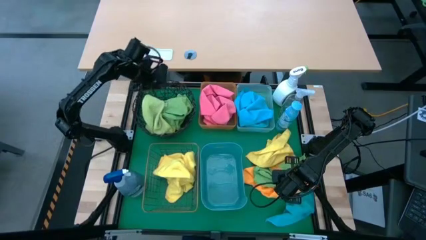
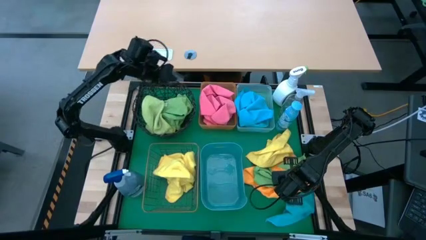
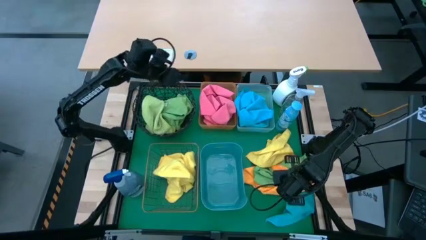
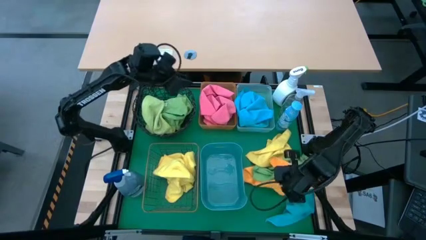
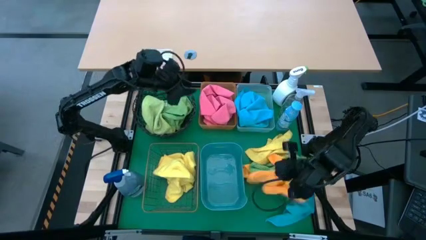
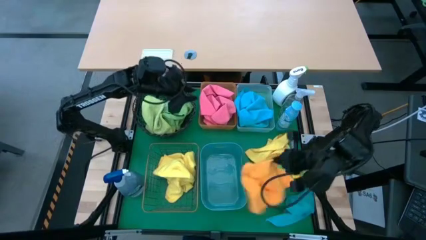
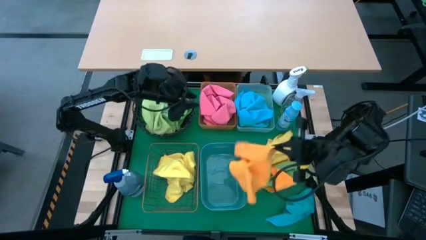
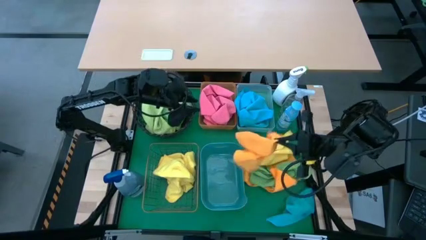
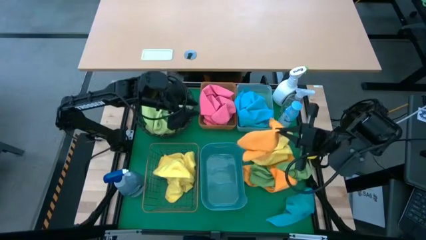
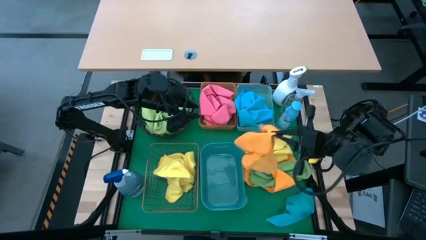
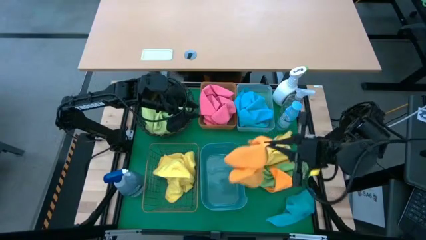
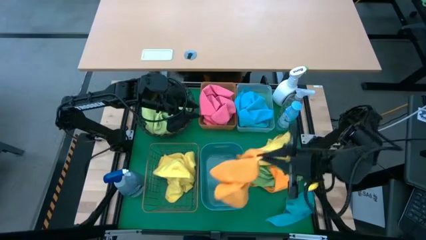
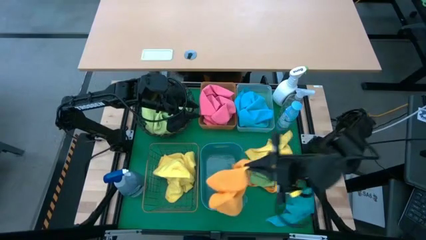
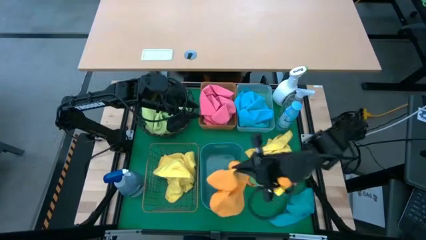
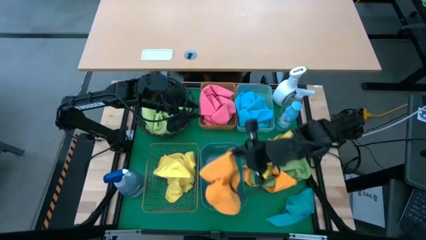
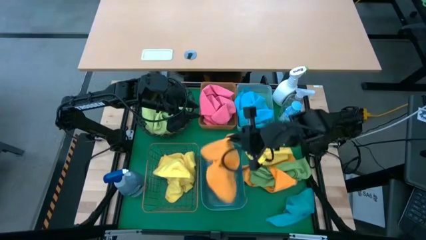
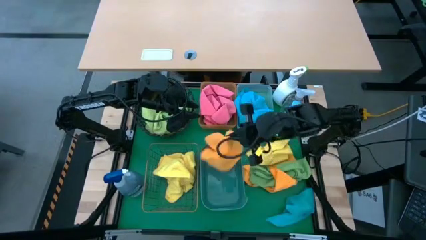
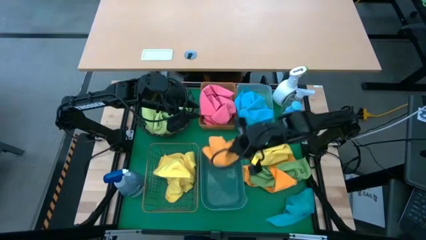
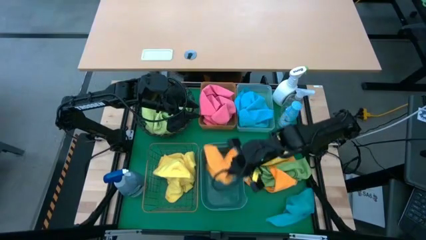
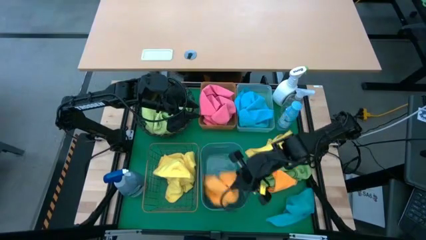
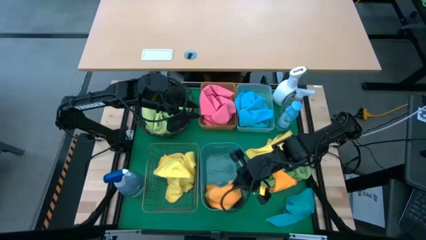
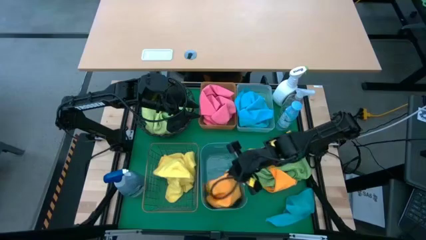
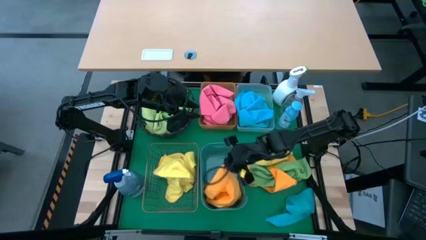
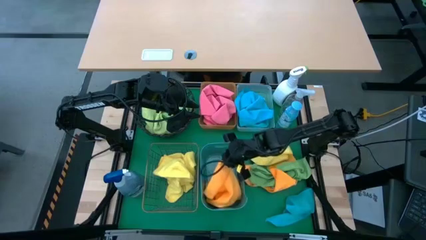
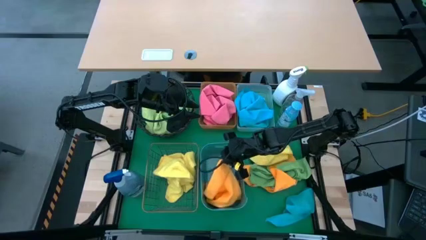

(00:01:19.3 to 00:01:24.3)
Task: Sort microfiber towel by color & place in baskets
Put the orange towel into the blue bin

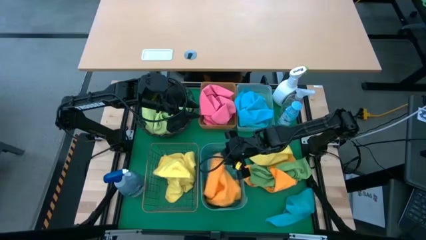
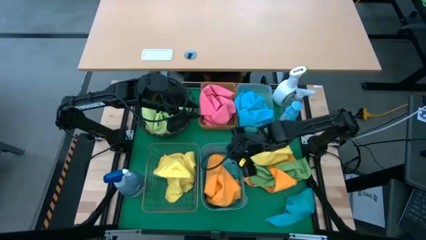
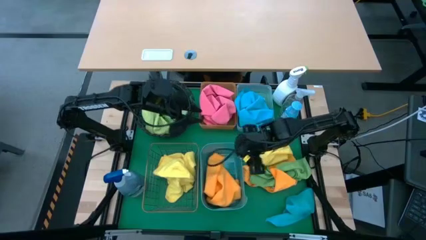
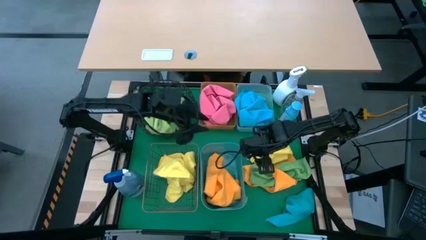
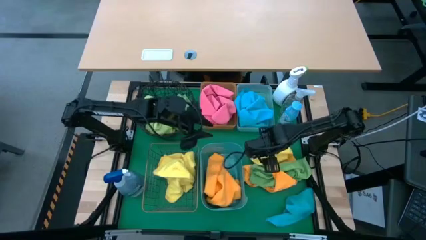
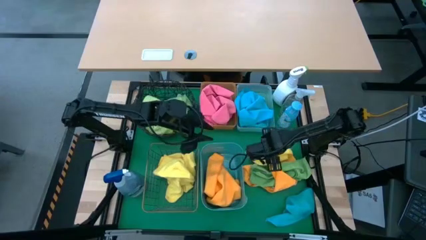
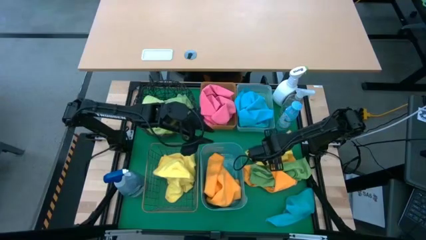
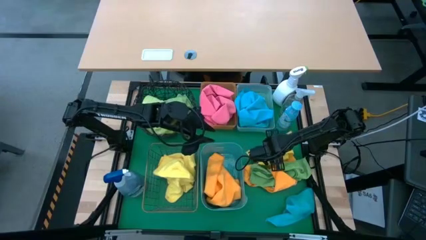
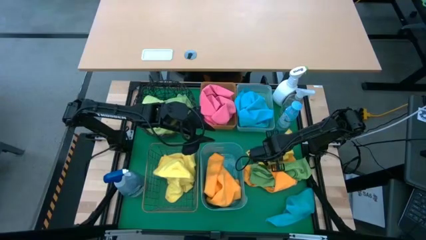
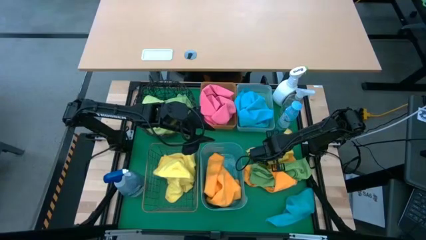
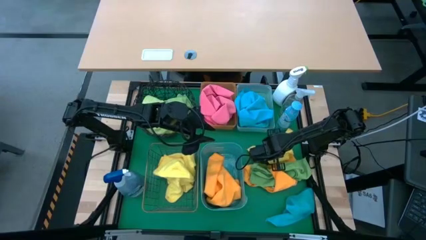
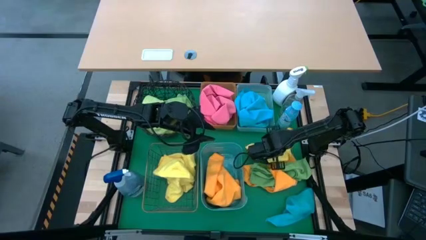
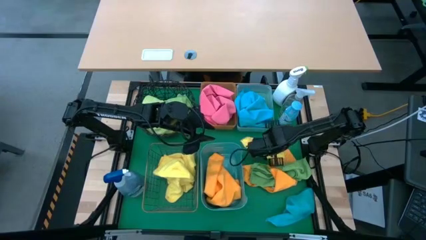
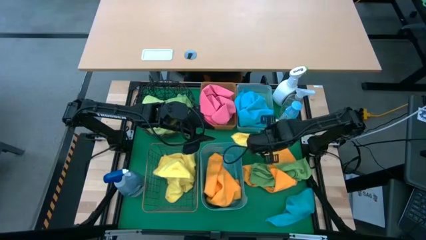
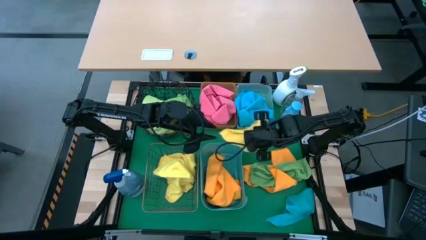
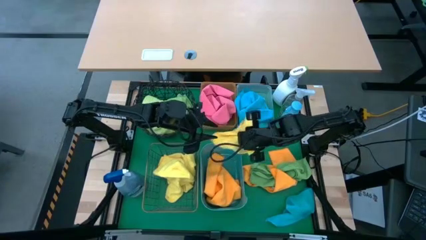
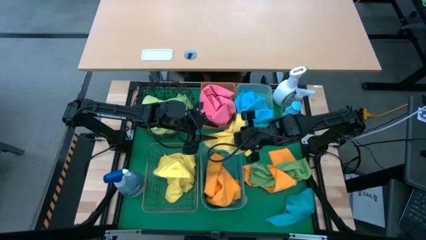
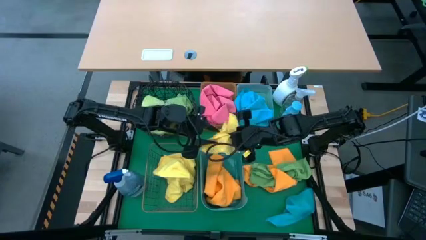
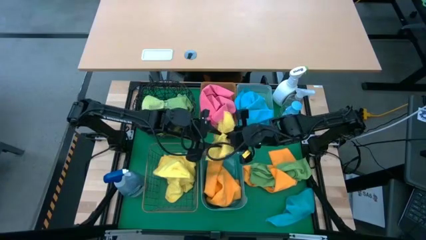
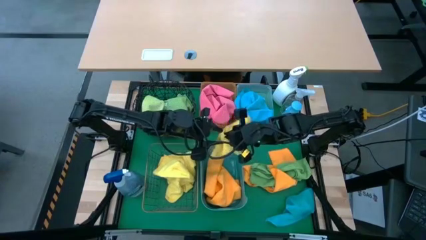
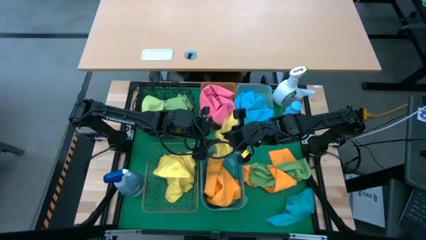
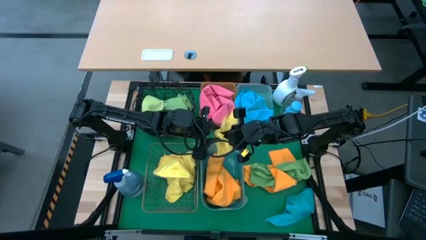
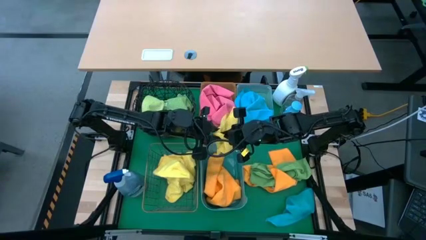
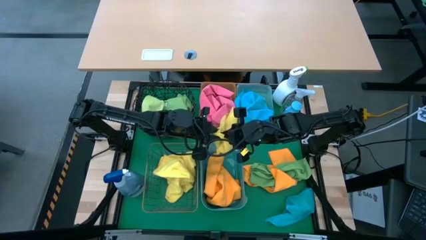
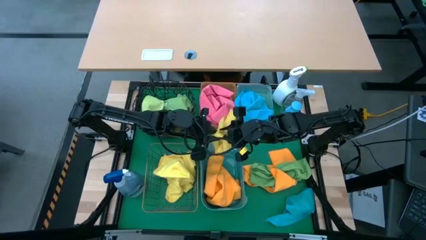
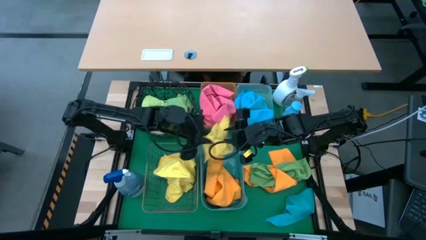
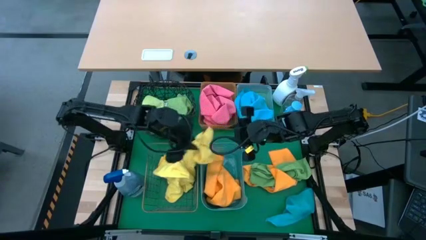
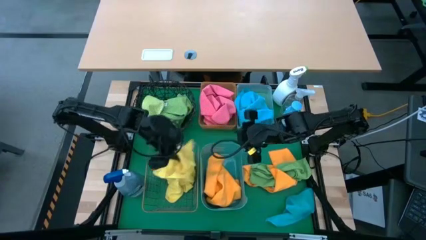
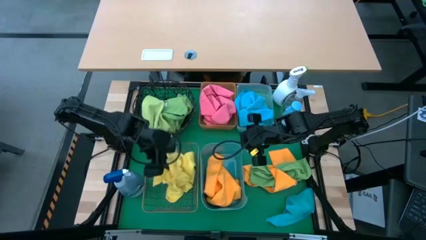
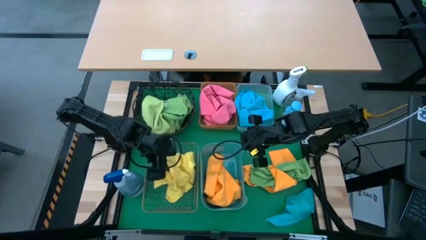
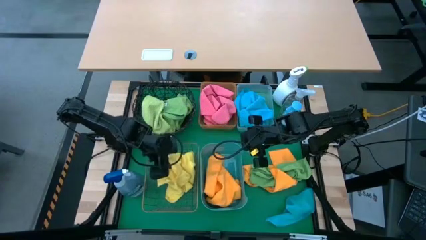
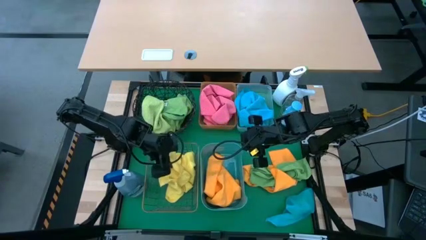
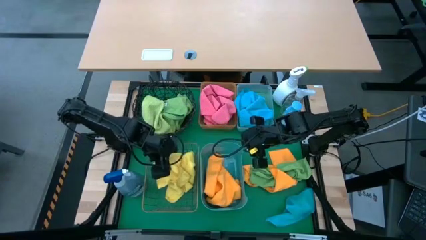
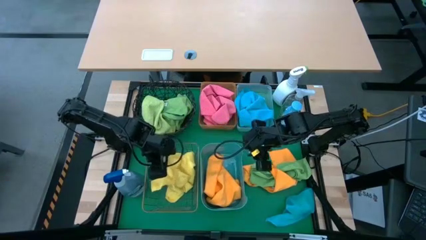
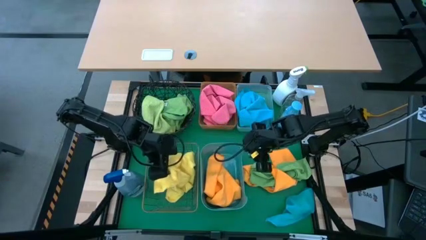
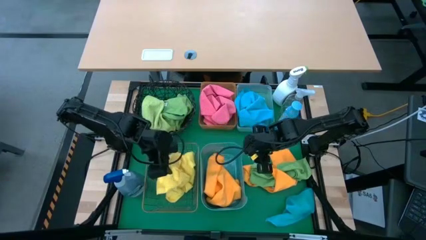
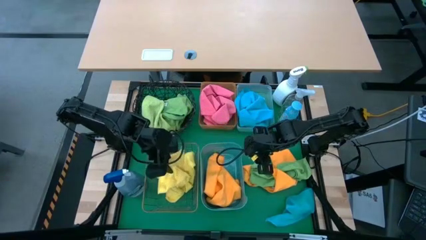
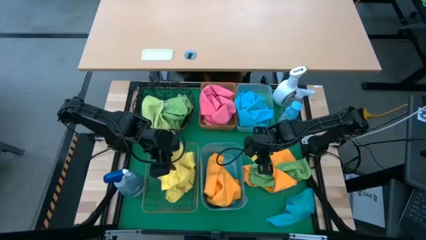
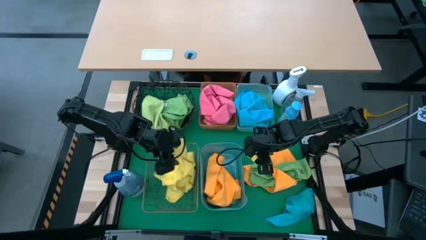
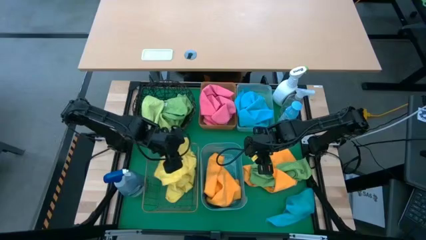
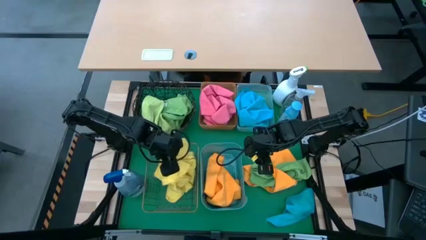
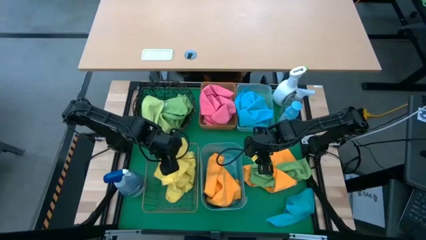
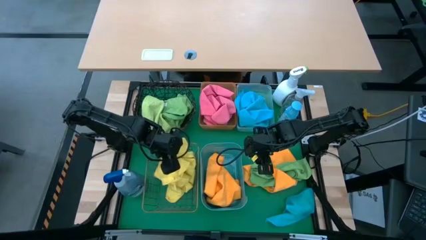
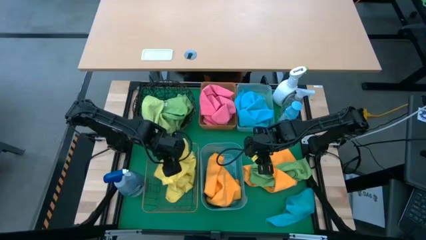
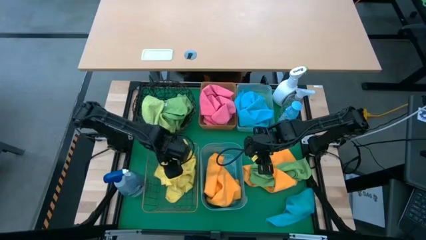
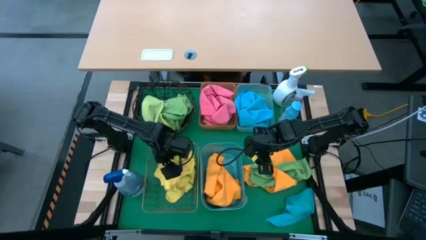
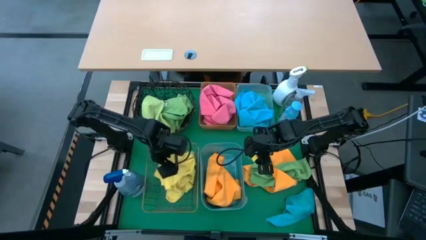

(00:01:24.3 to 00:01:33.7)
Put the yellow towel into the gold wire basket

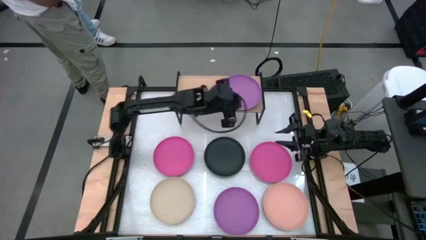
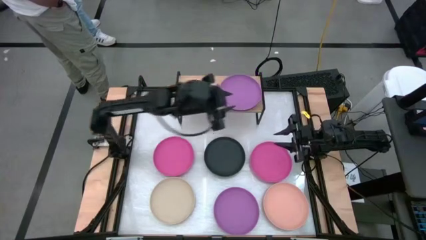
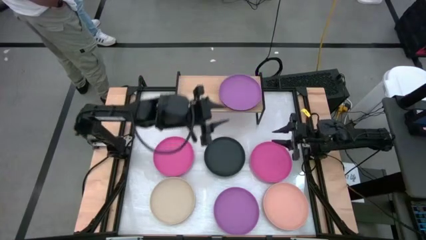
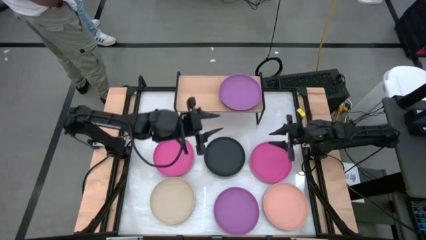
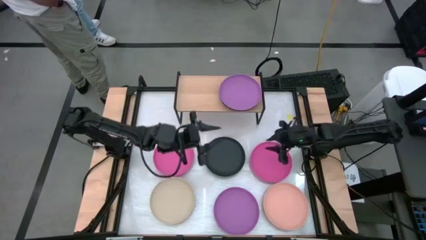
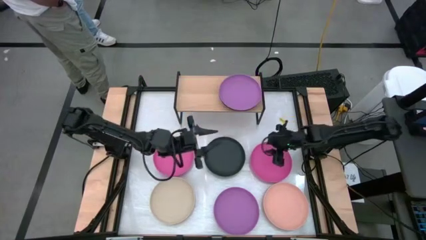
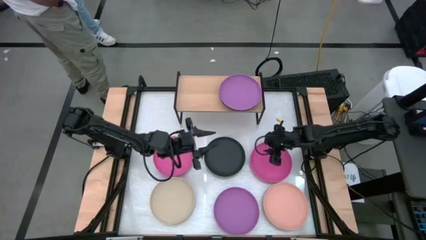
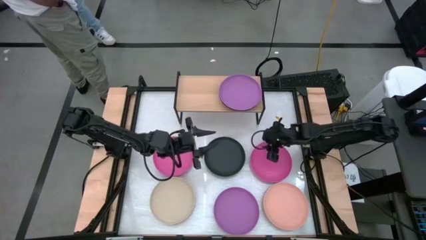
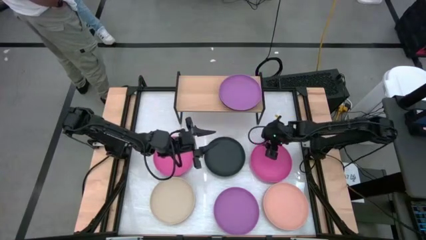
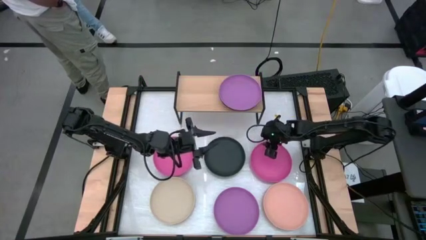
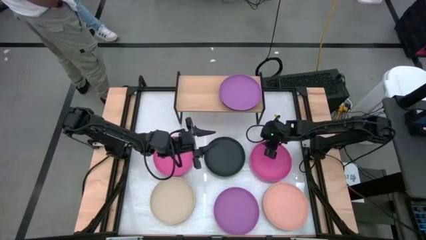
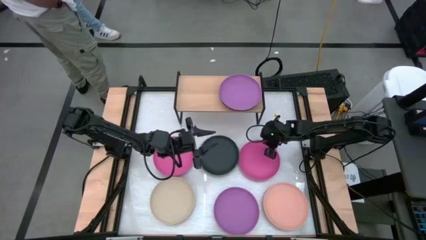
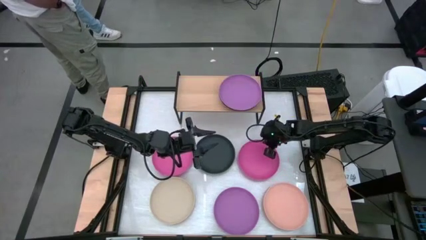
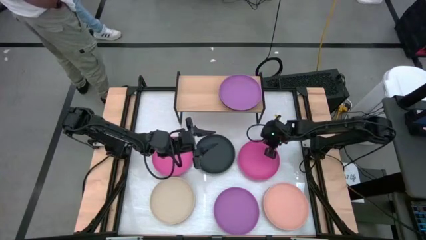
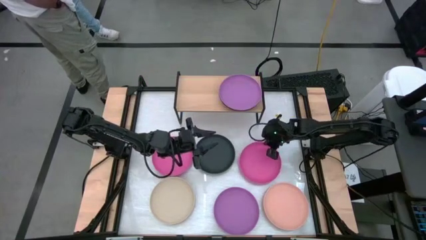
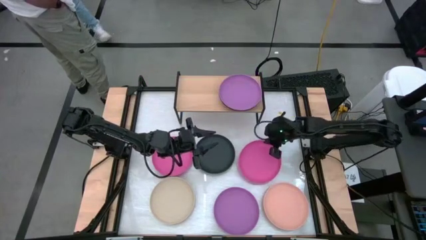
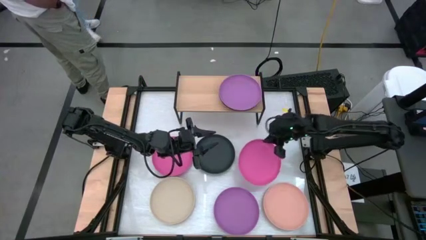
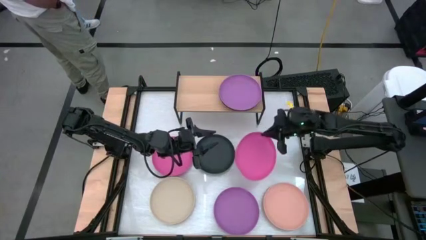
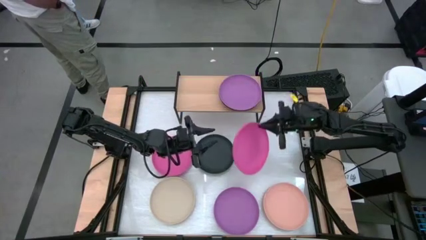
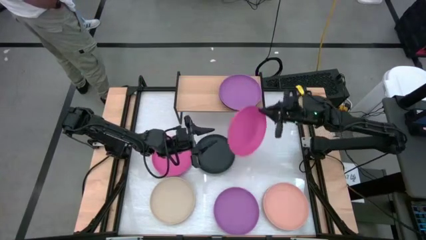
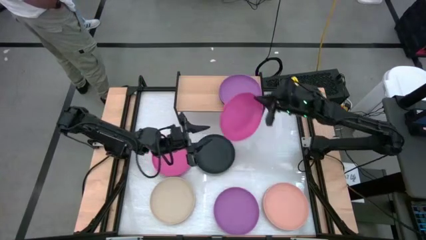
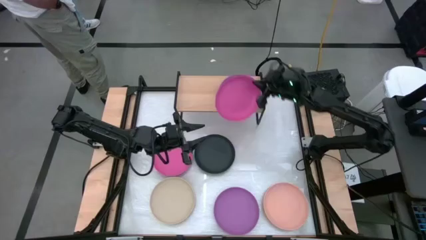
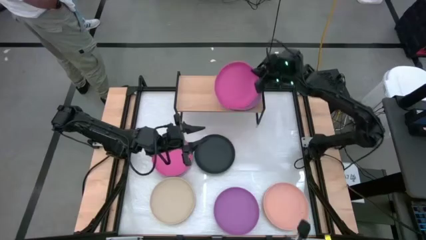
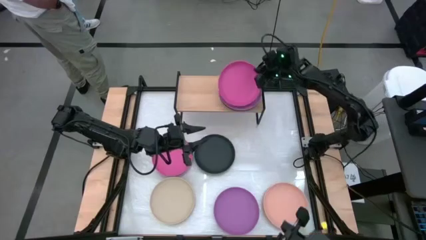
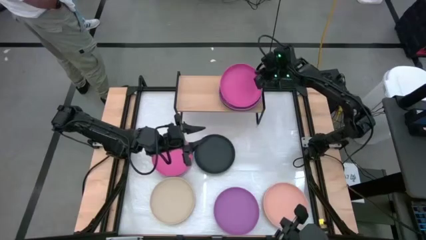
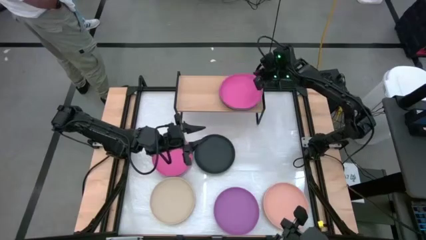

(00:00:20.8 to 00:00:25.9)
Task: Place and stack plates onto a shelf
Stack the right pink plate on top of the purple plate on the shelf
